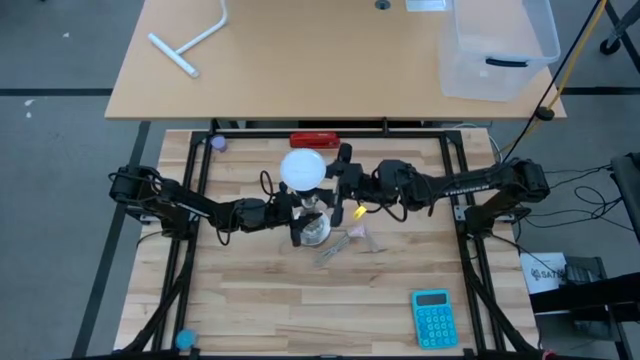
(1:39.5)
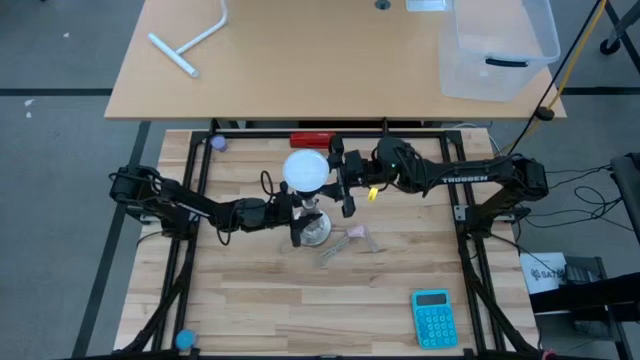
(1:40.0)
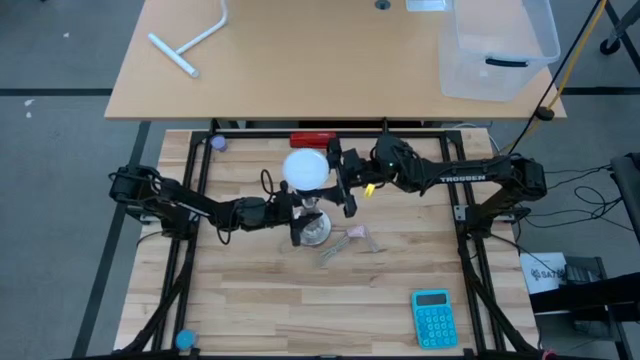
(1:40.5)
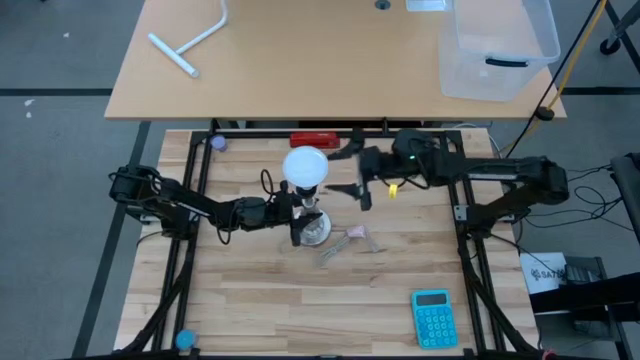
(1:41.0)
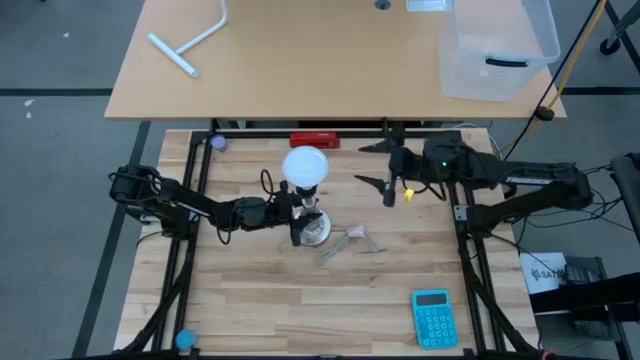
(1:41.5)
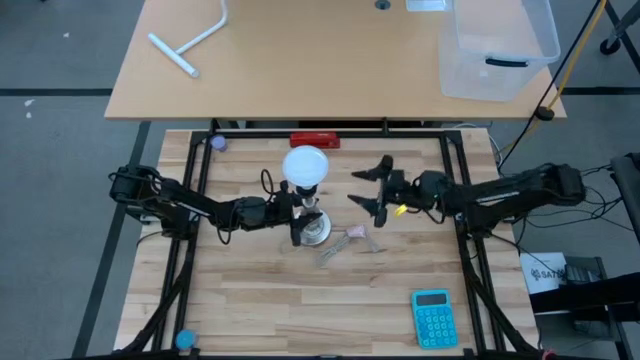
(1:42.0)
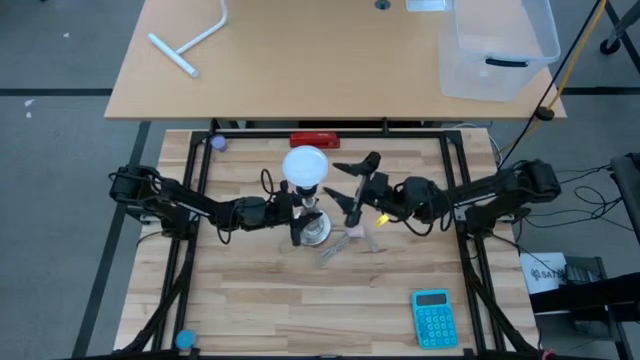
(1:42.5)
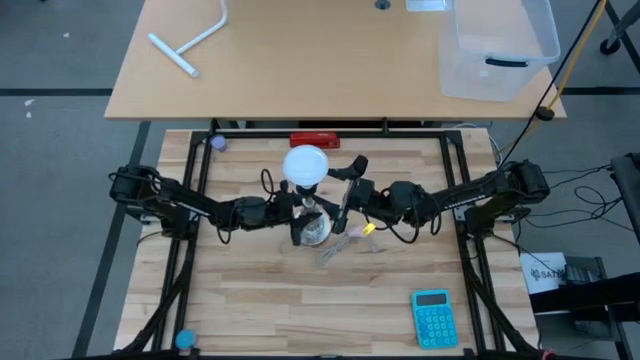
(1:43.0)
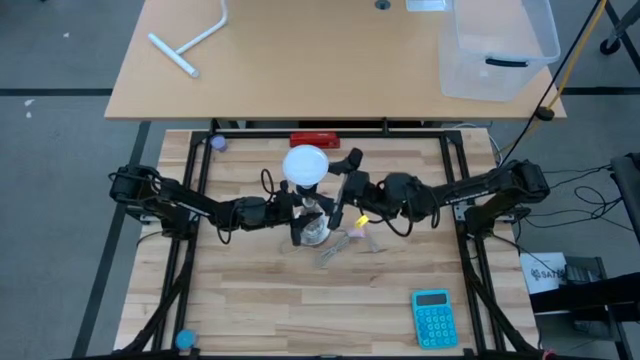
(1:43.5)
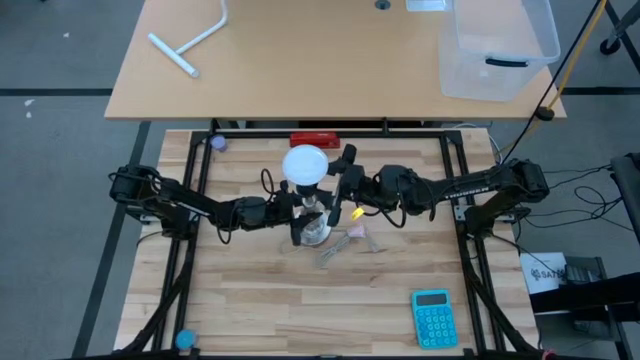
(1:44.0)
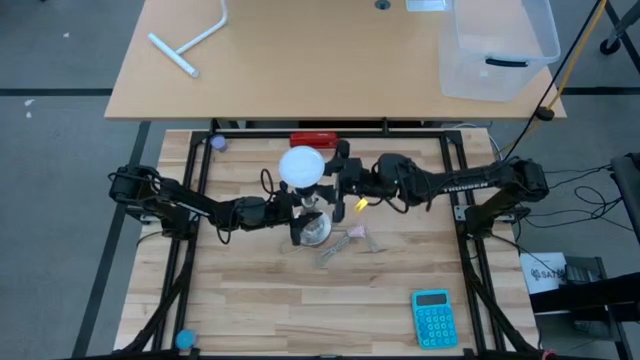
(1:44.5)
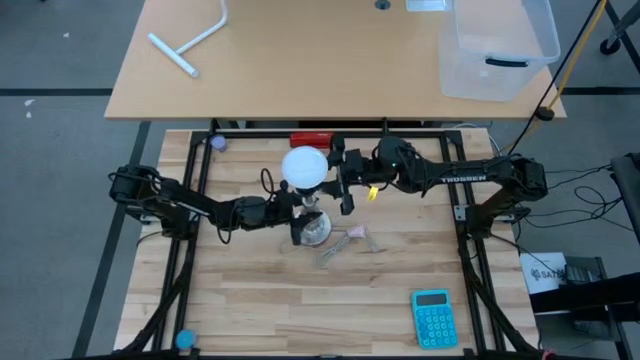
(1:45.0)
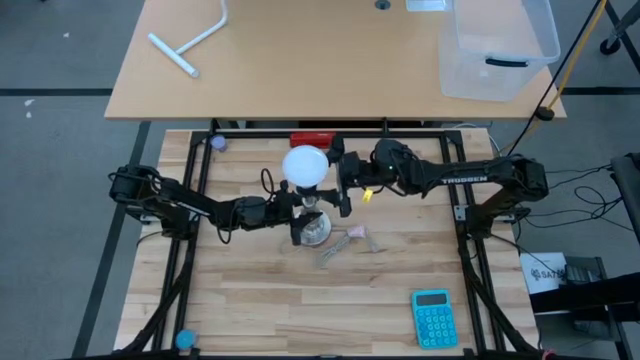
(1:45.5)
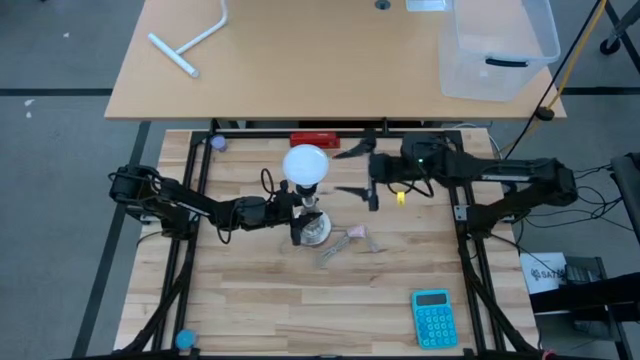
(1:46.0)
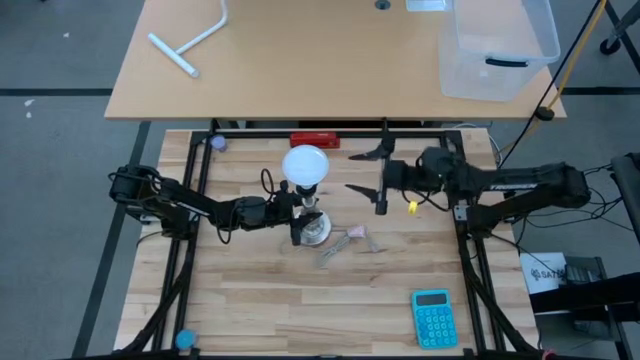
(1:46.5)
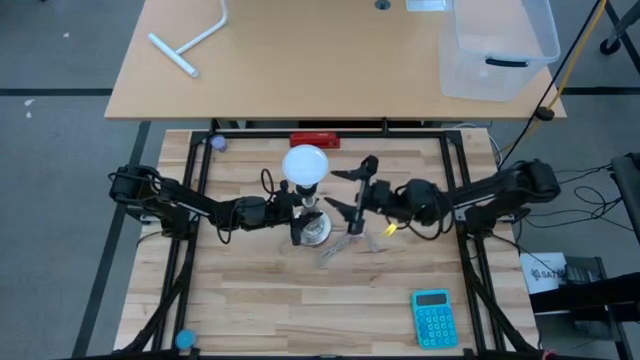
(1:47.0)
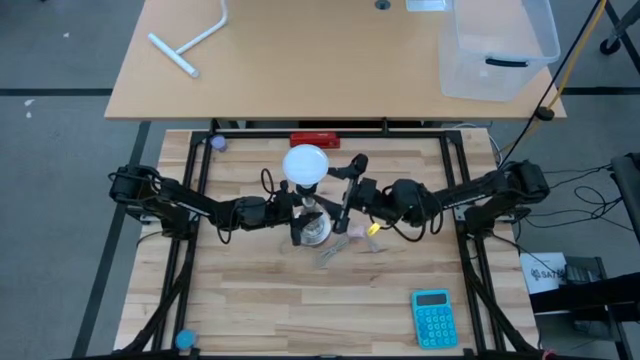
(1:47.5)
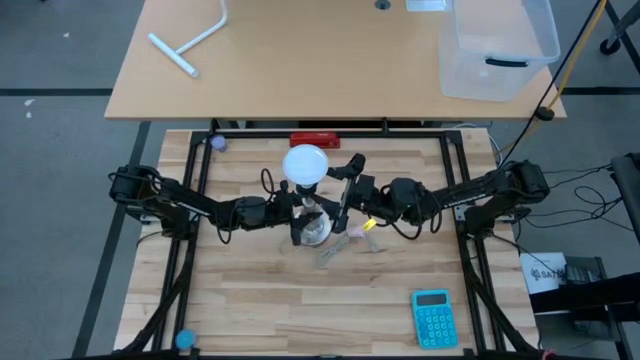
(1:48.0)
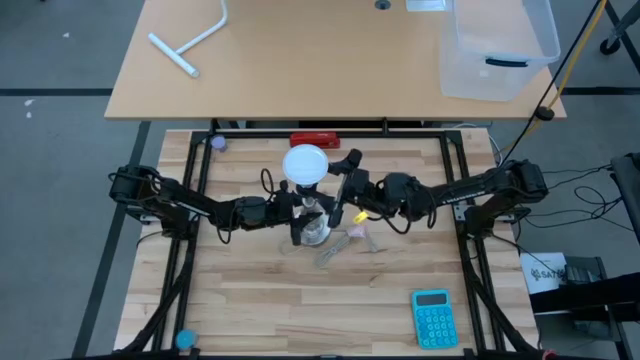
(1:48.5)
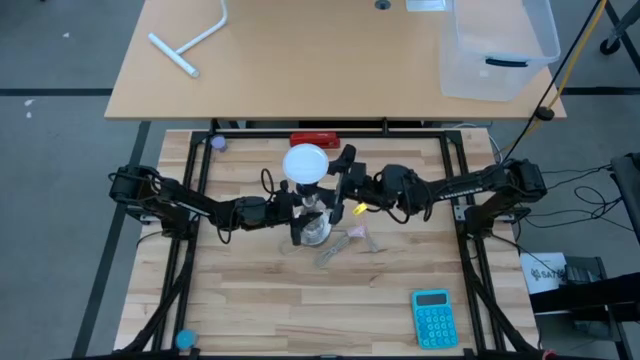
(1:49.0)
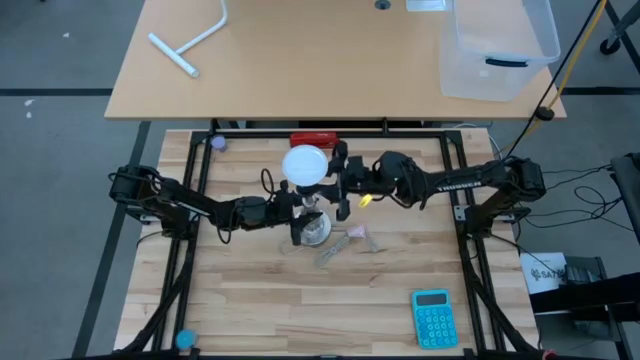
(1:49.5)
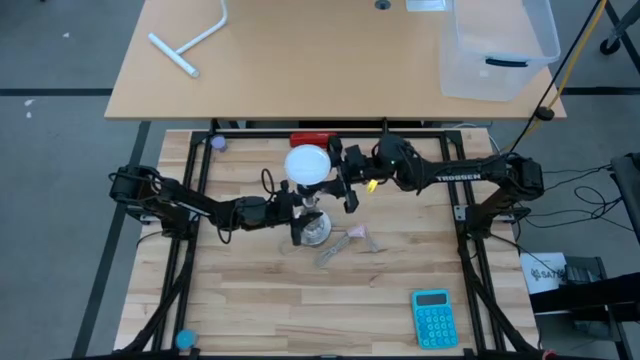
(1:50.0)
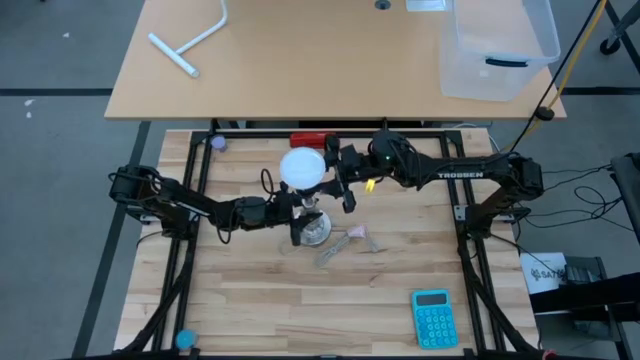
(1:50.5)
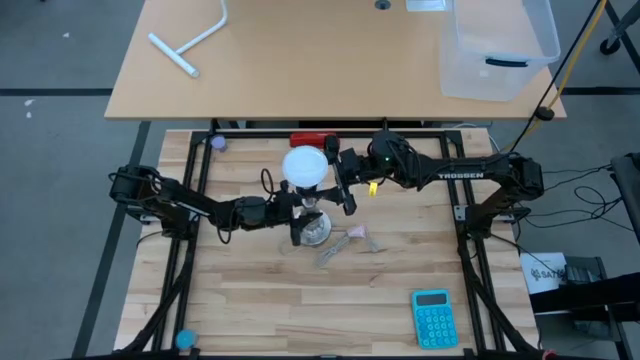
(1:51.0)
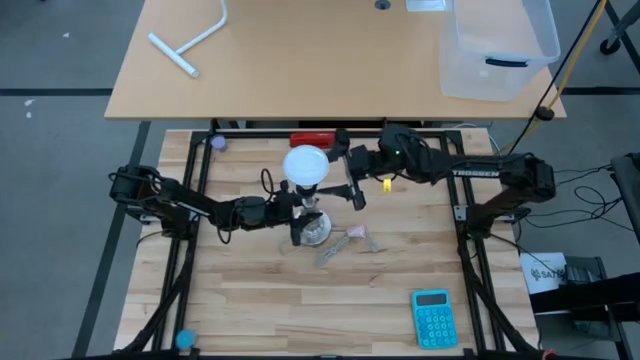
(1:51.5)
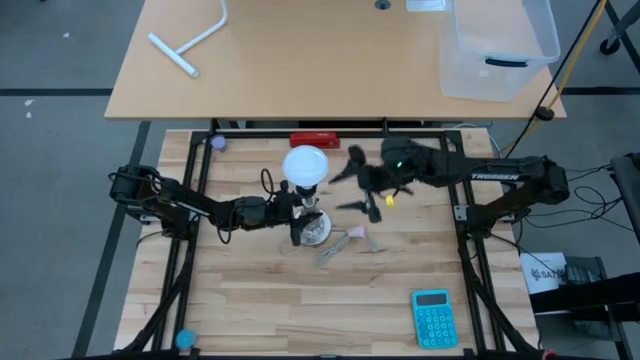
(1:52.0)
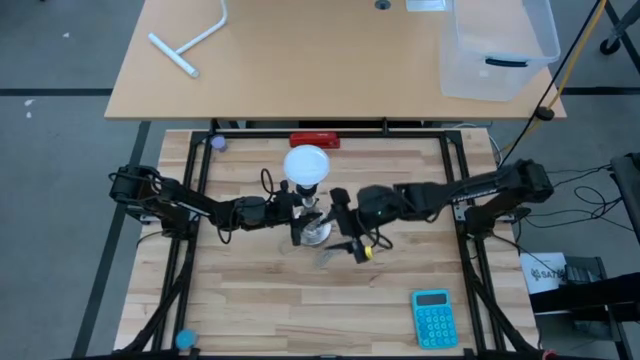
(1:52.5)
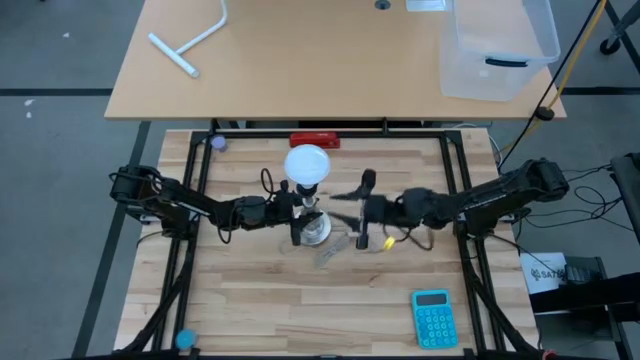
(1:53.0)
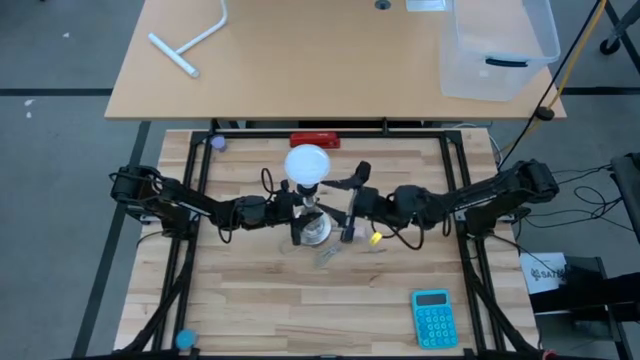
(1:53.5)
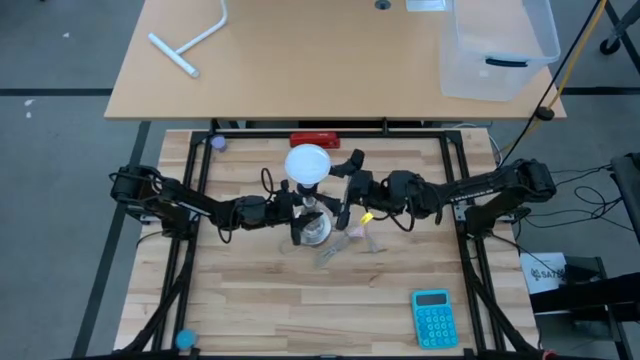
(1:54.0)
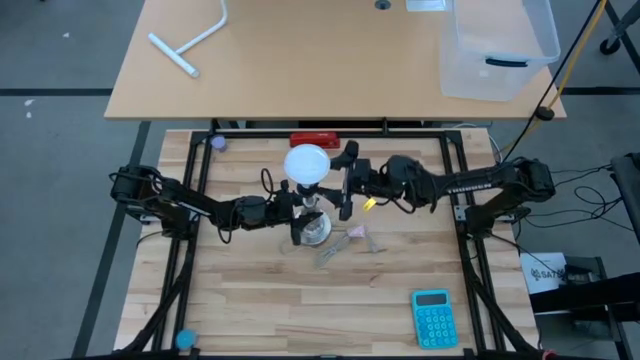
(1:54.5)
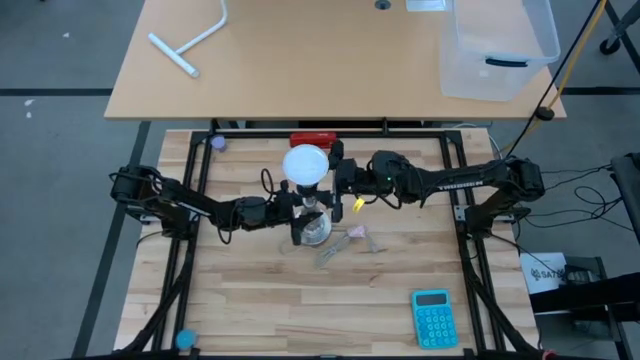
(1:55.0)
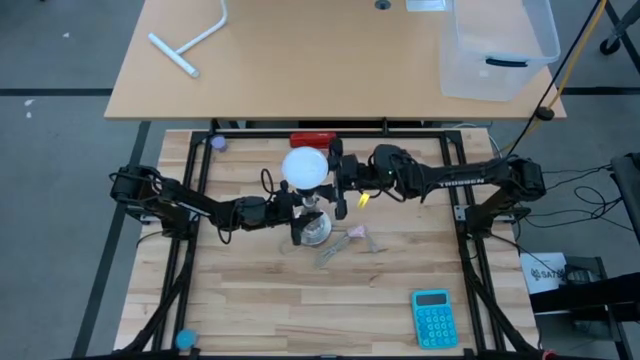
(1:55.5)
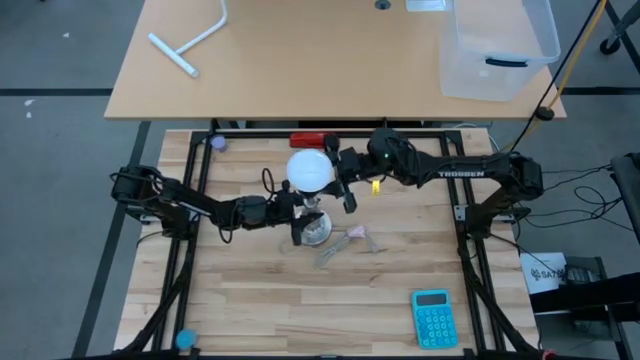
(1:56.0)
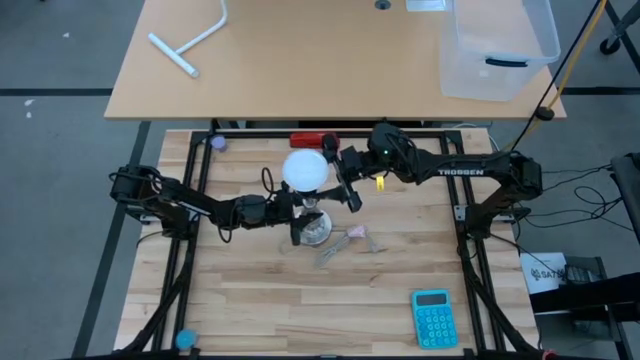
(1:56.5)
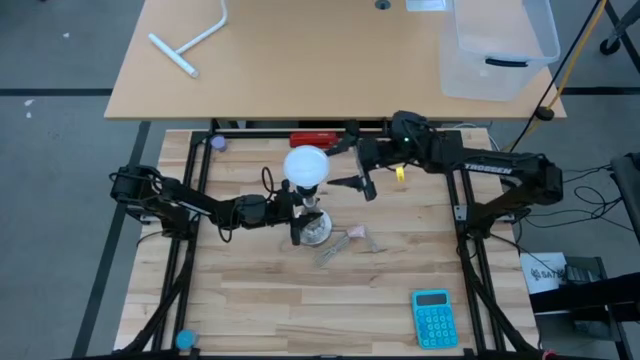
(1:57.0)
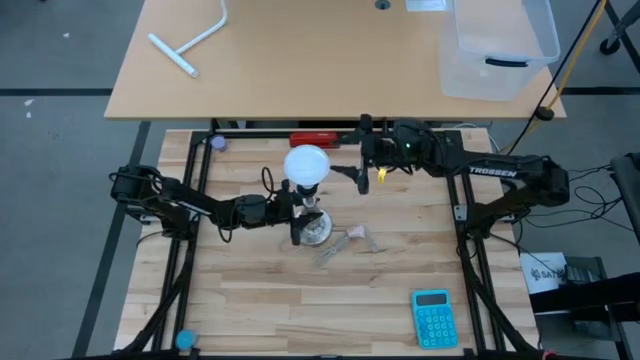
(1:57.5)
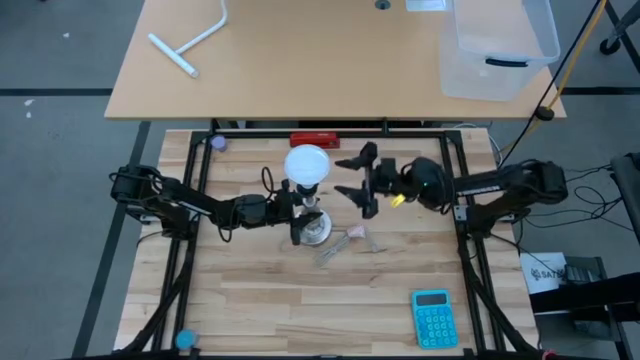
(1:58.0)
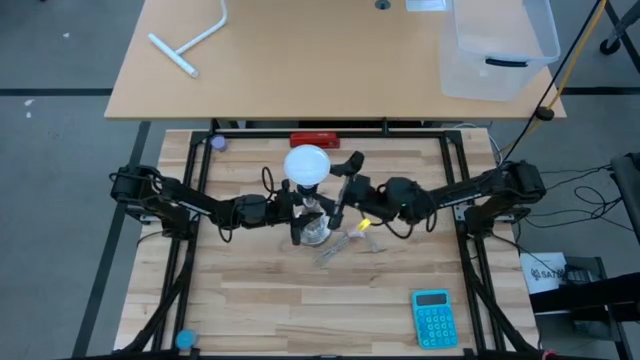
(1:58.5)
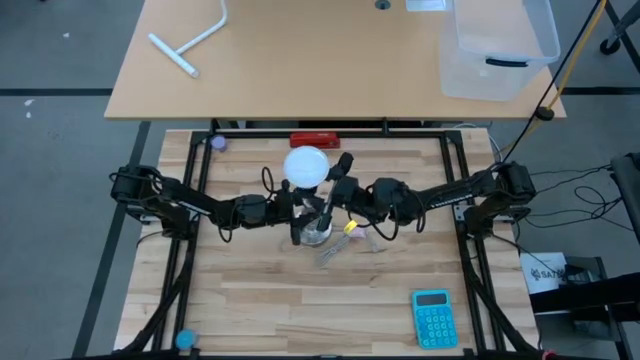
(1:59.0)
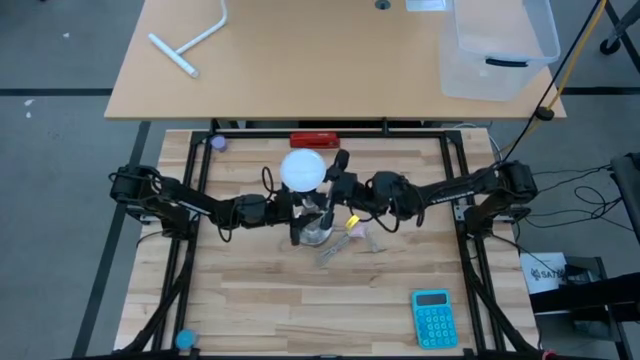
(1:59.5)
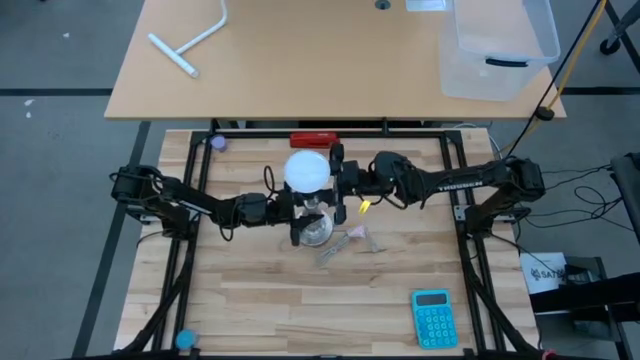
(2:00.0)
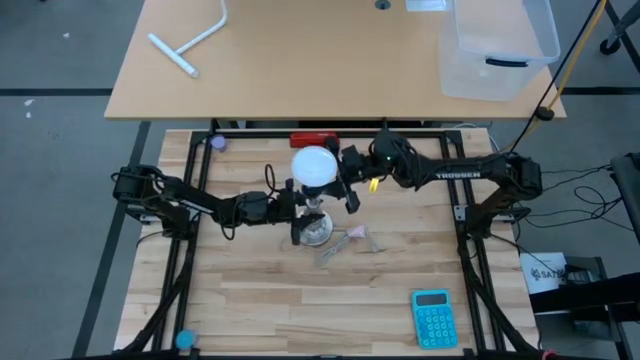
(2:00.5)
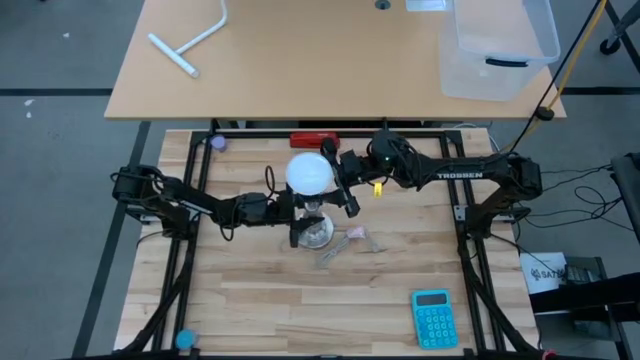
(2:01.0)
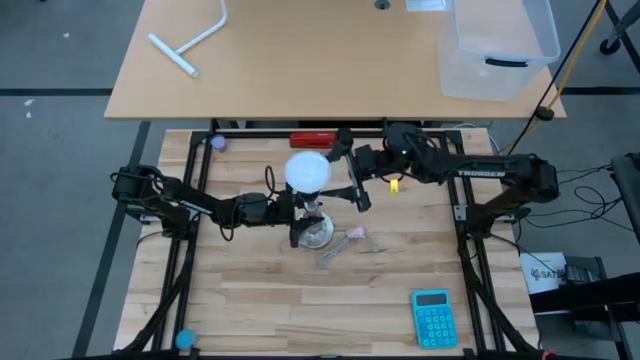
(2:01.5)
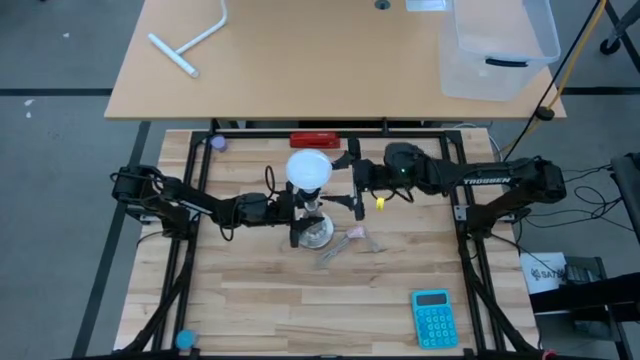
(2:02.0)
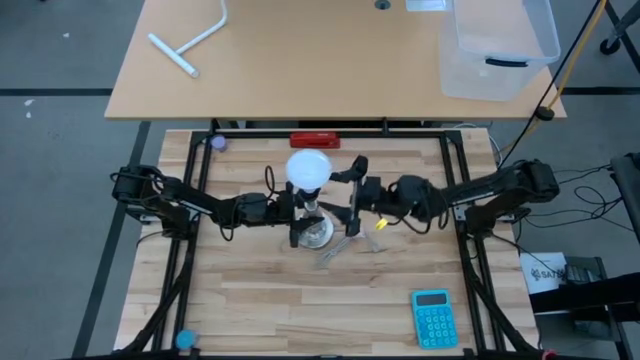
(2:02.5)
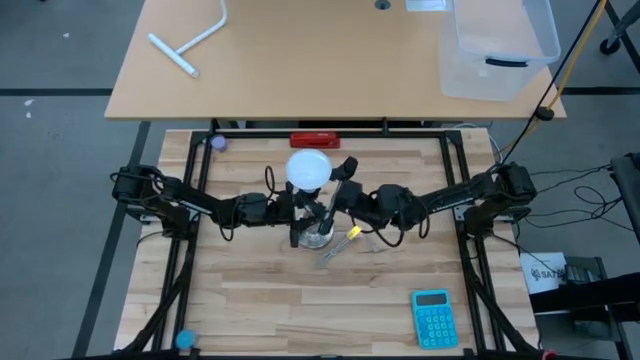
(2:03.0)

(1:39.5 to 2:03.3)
Task: Screw lightbulb
Remove the white lightbulb from the silver lamp
